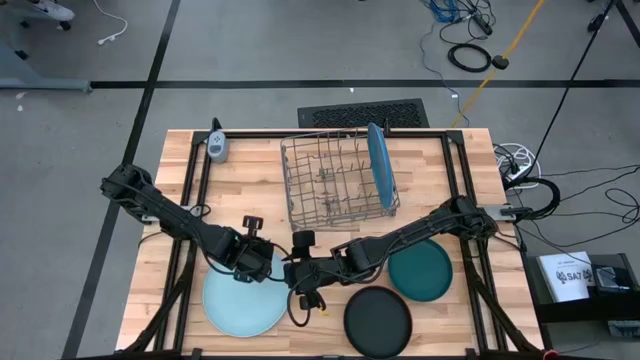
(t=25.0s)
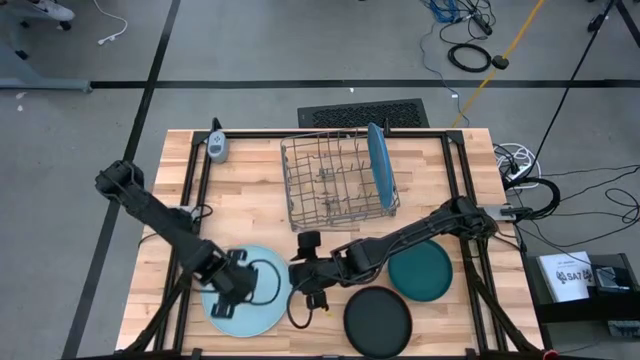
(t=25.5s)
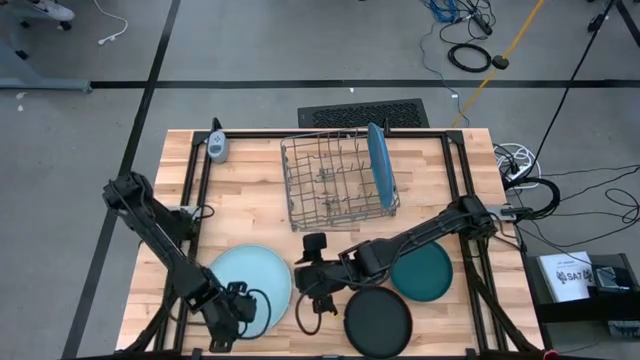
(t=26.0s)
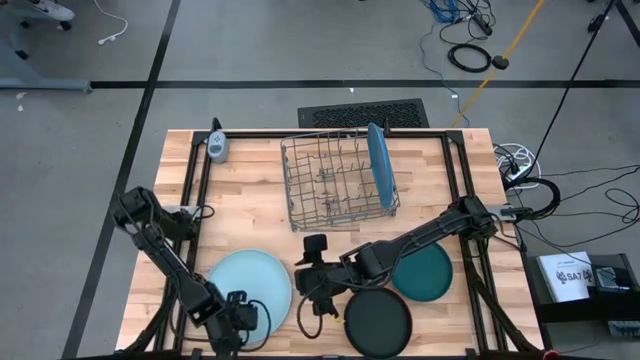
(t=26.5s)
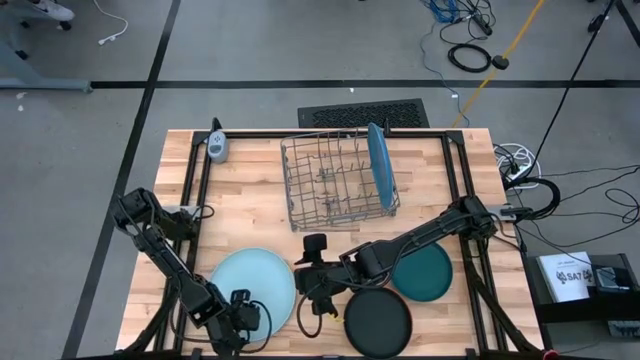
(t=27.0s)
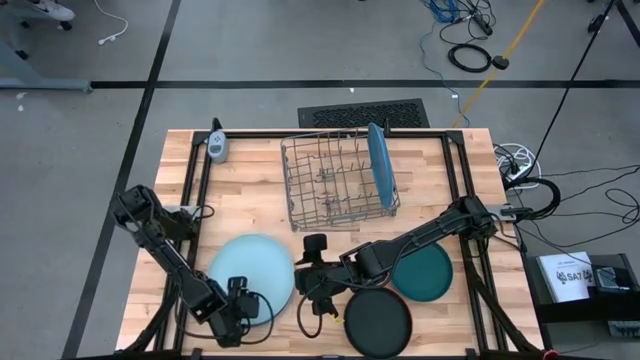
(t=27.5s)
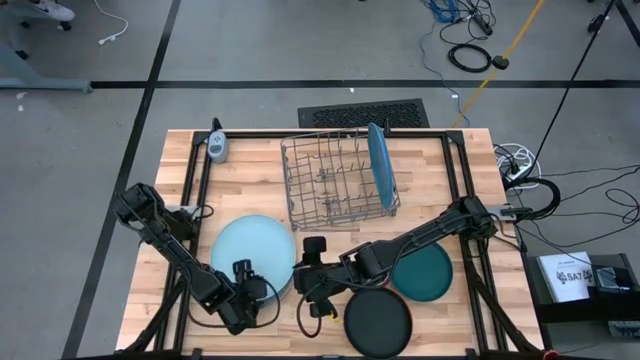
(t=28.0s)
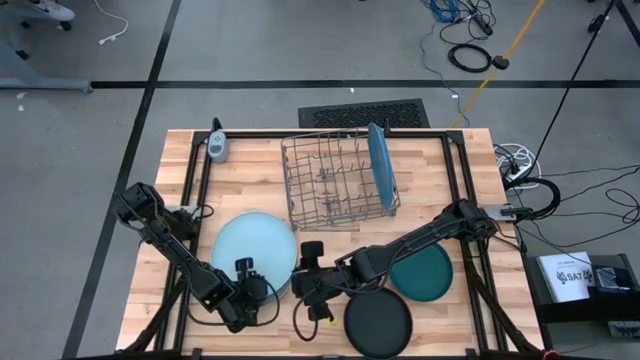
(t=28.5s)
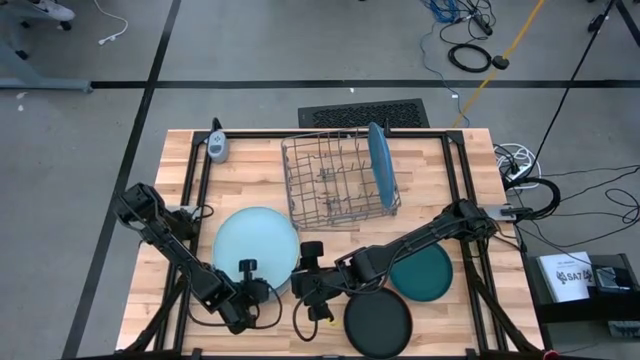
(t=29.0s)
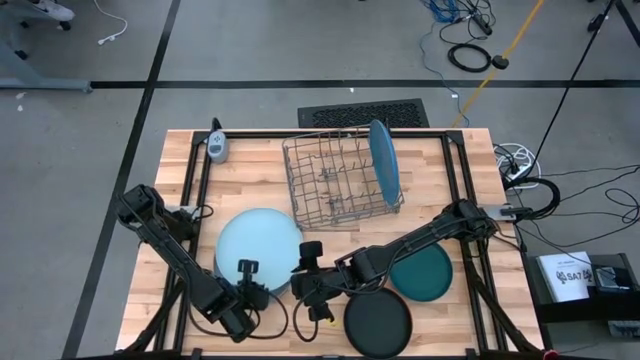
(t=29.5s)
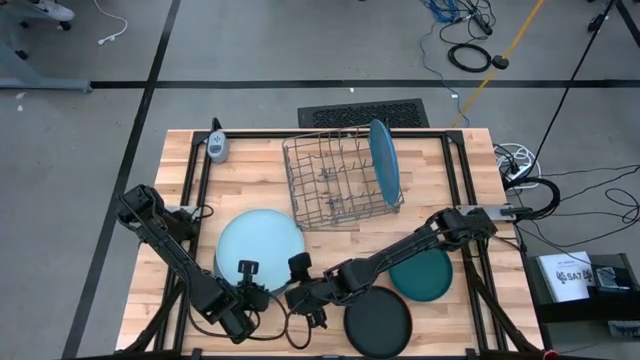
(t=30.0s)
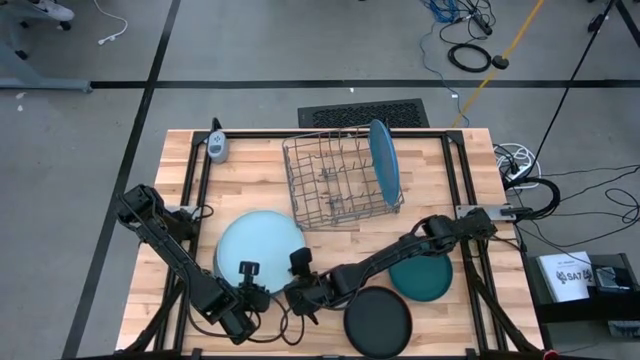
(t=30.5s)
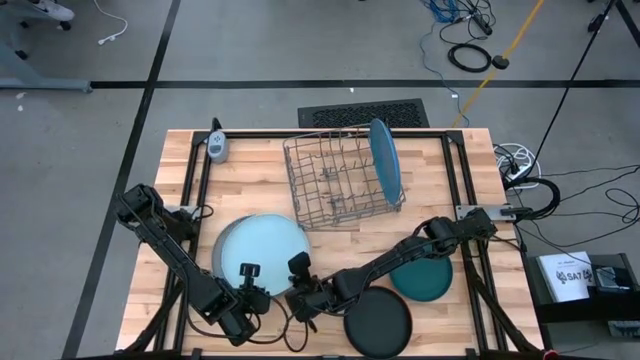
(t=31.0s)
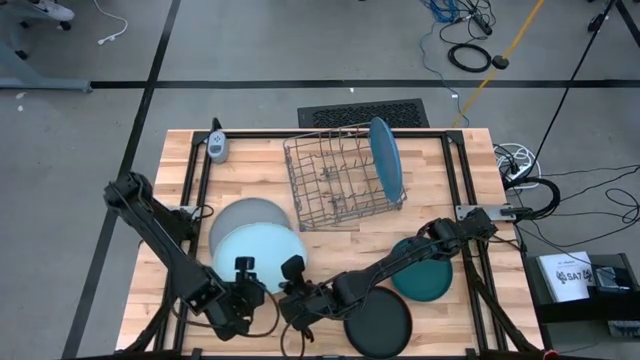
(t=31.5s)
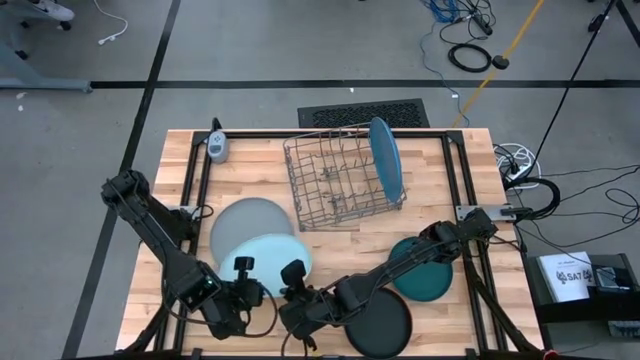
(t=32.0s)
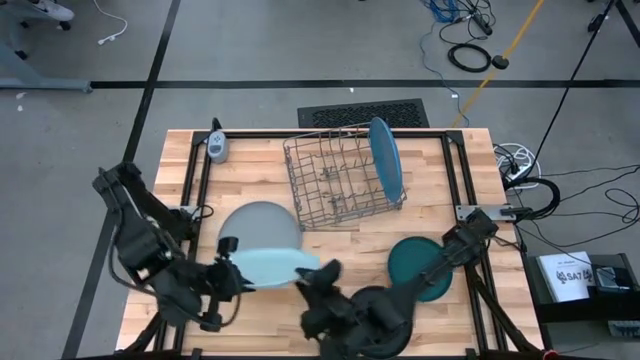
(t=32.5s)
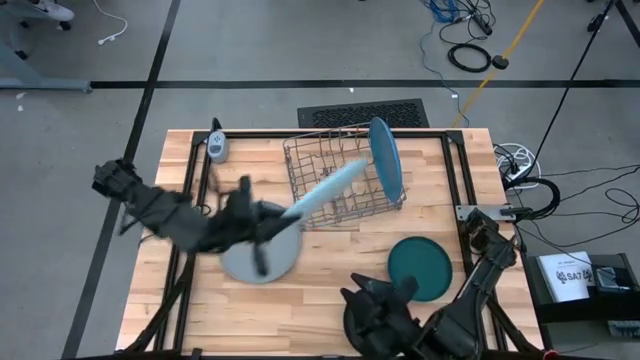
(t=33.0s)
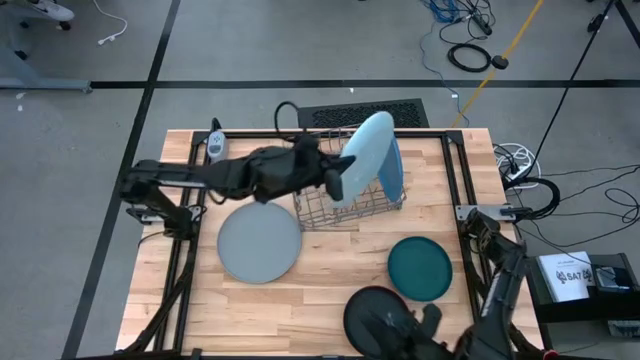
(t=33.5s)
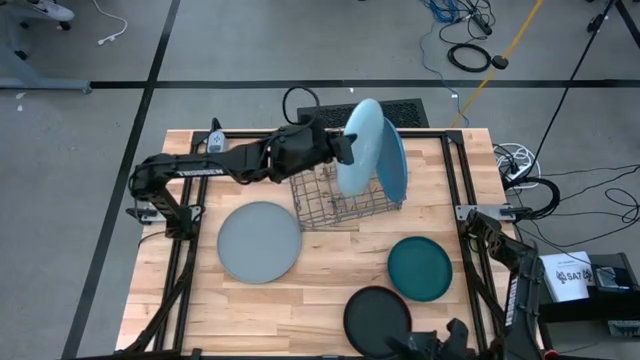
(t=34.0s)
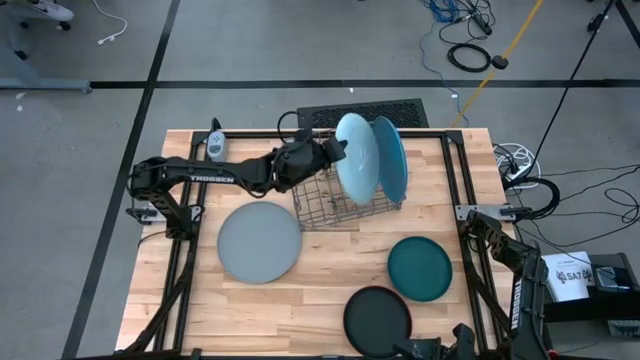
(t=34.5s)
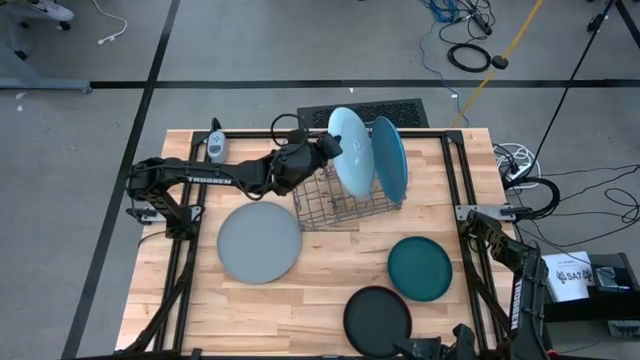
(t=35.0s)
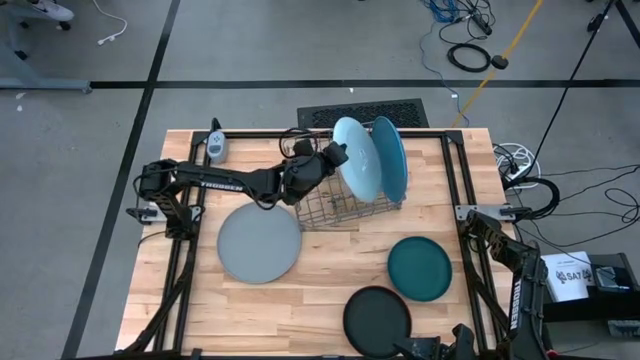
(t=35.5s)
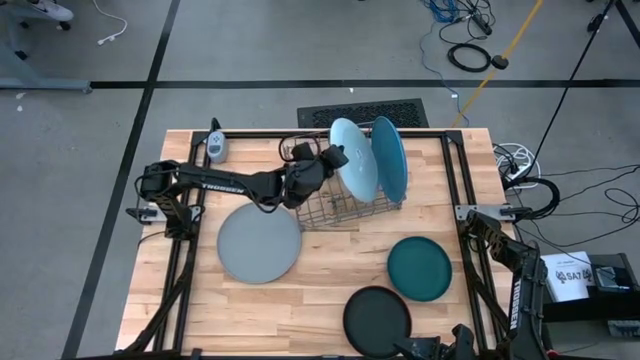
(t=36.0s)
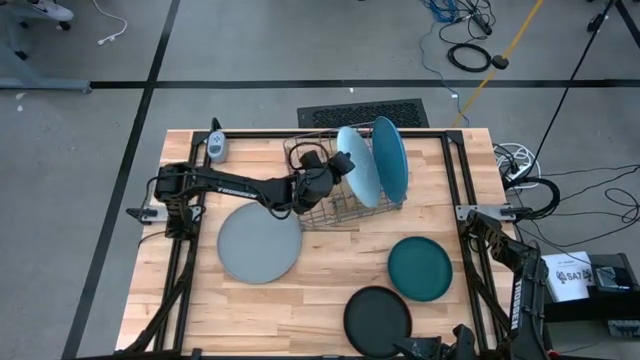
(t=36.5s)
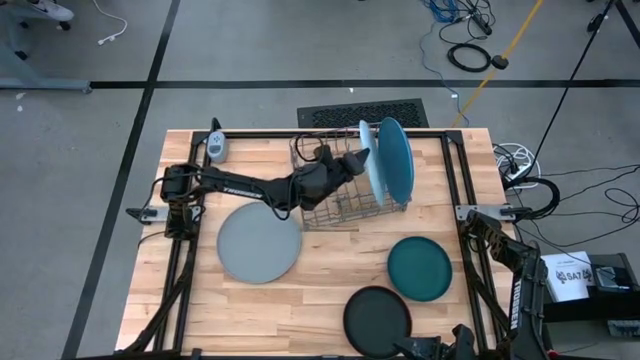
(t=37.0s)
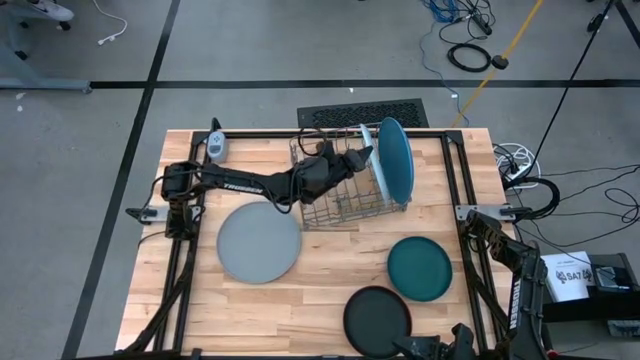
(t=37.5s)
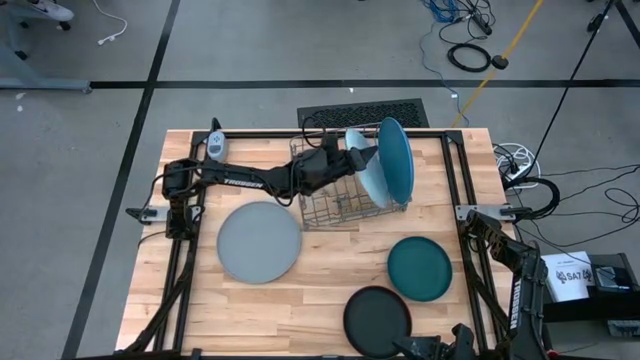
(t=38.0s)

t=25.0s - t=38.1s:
Task: Sort dishes
Put the light blue plate in the dish rack

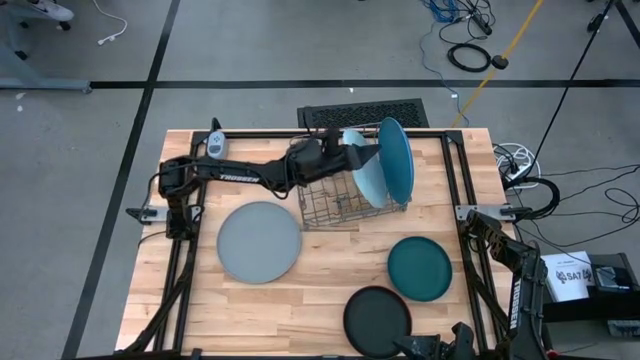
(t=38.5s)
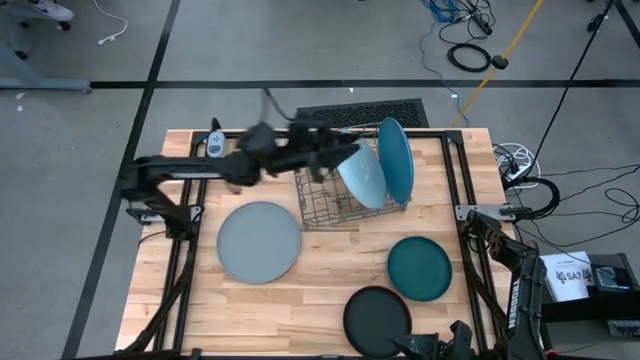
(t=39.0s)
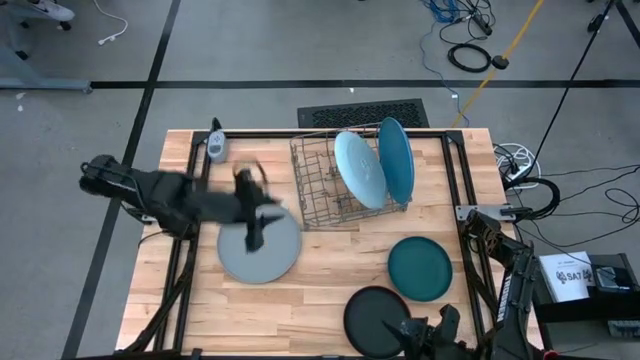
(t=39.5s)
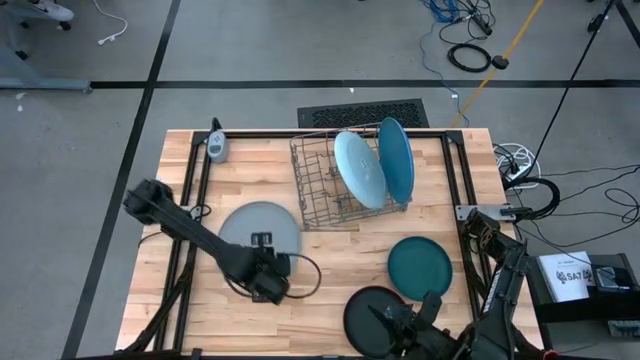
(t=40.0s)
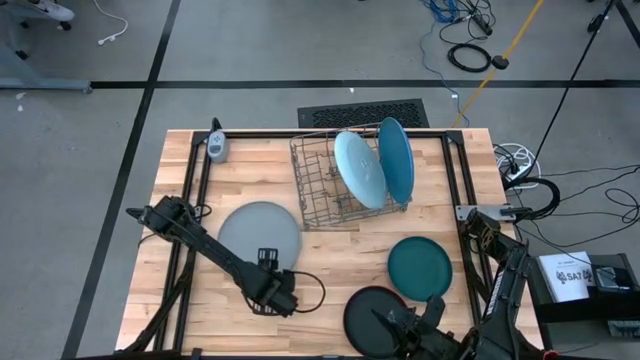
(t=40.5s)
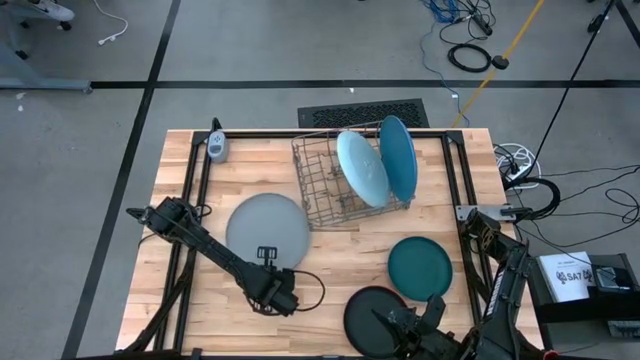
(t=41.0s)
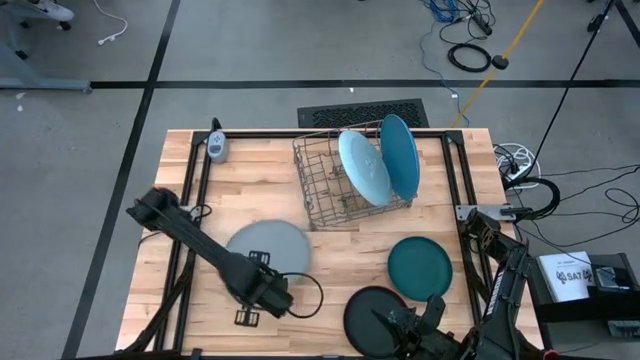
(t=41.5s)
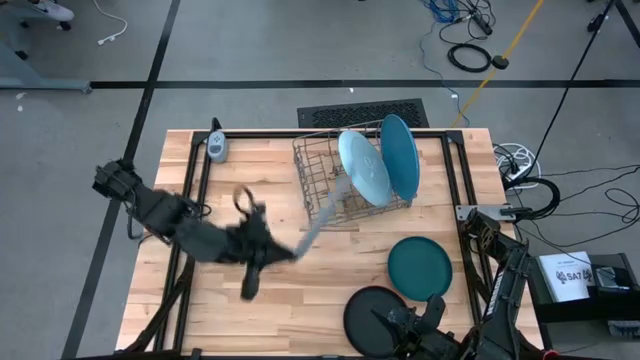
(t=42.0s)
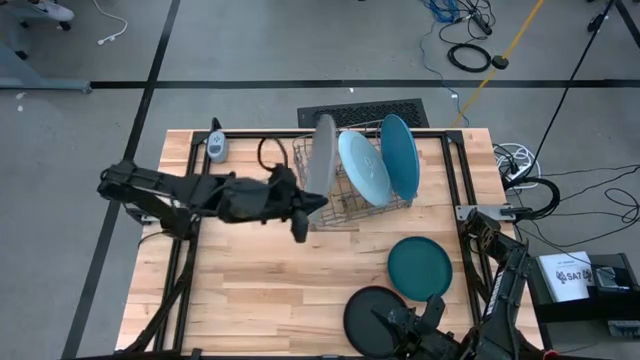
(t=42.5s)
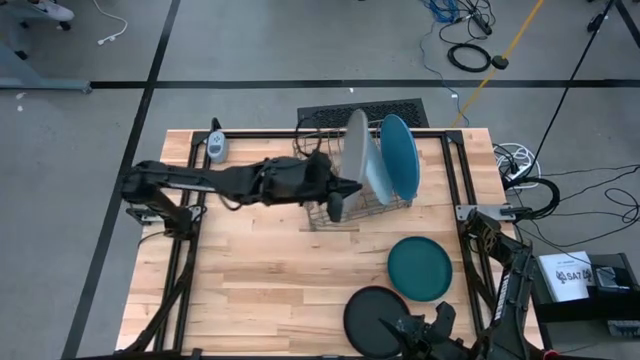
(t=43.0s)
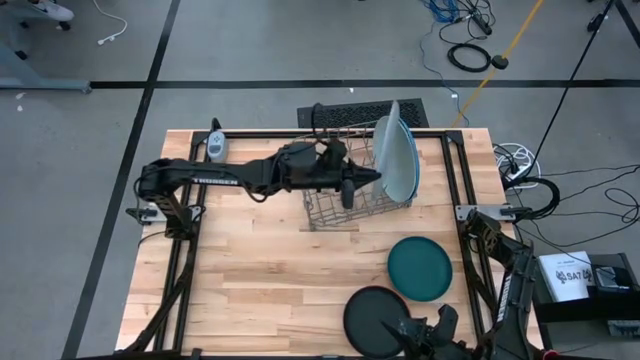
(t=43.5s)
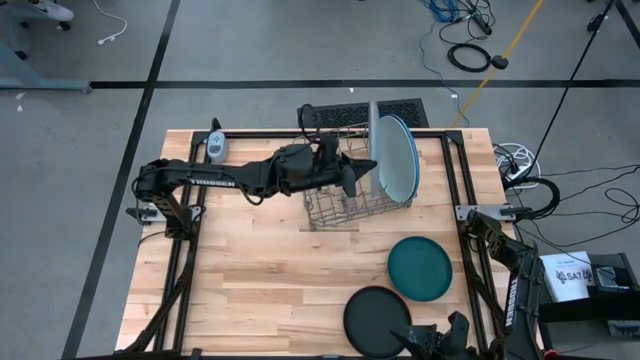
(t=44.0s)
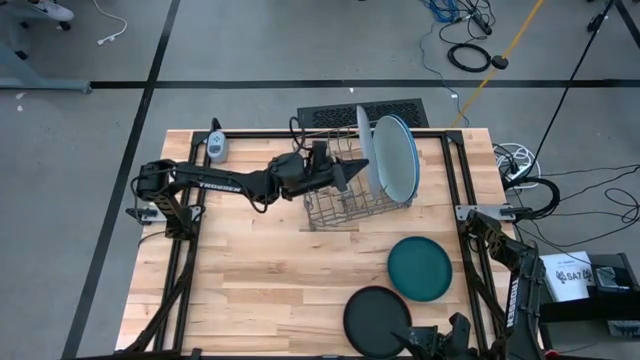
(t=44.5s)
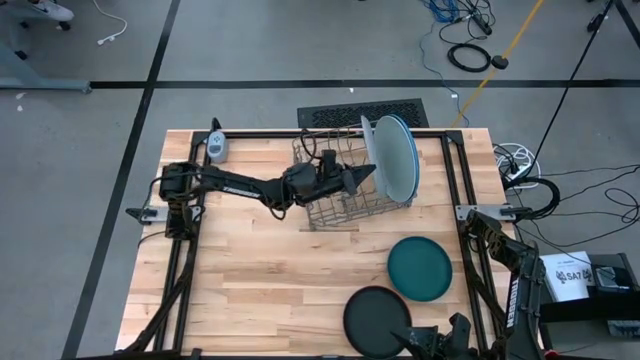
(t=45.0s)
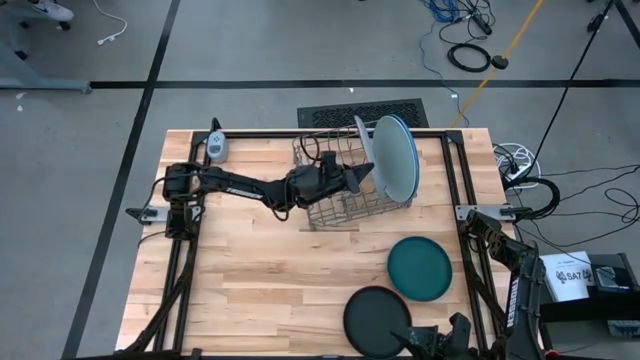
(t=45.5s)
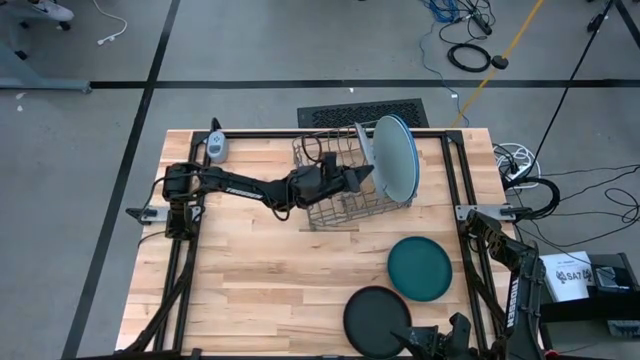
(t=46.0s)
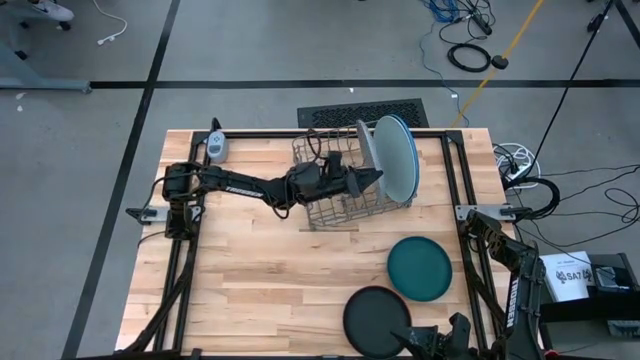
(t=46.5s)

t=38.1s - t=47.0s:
Put the gray plate in the dish rack
